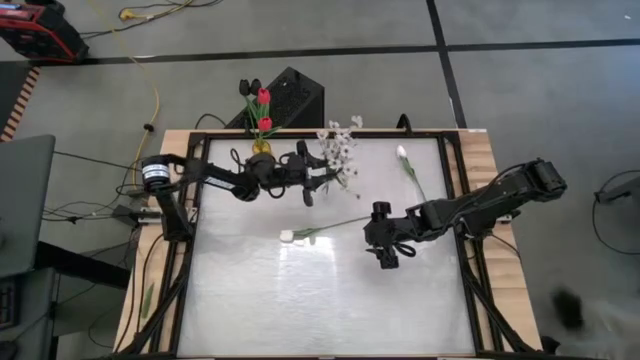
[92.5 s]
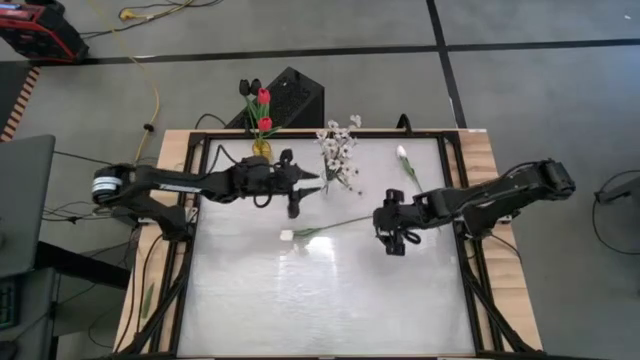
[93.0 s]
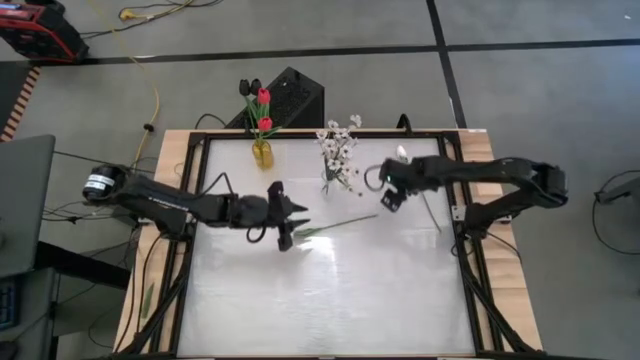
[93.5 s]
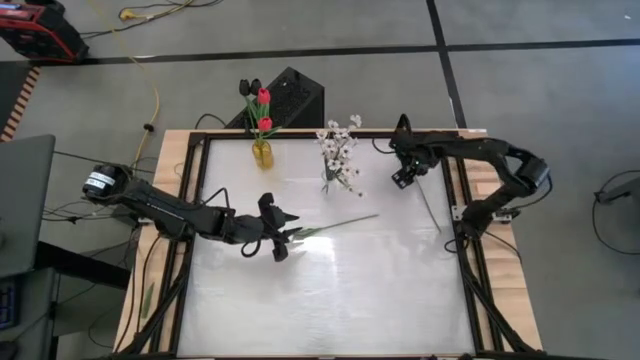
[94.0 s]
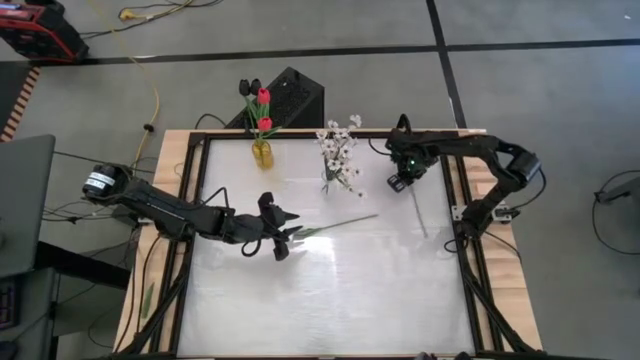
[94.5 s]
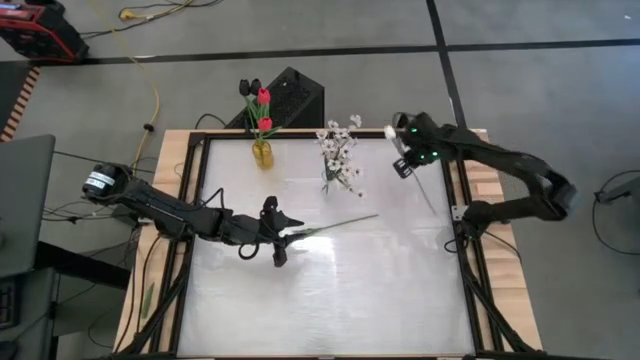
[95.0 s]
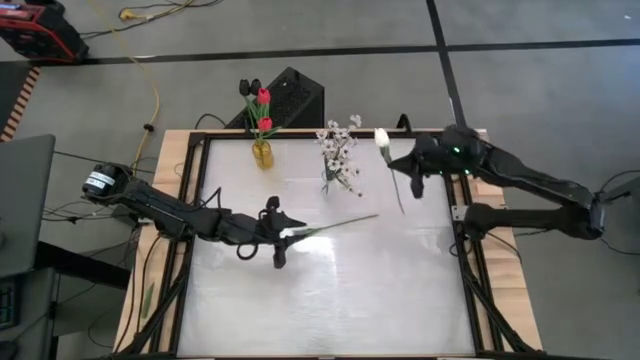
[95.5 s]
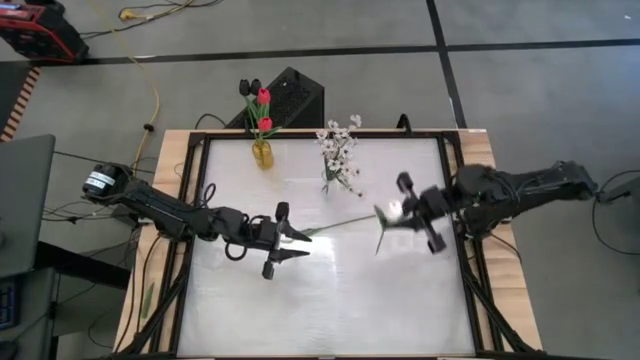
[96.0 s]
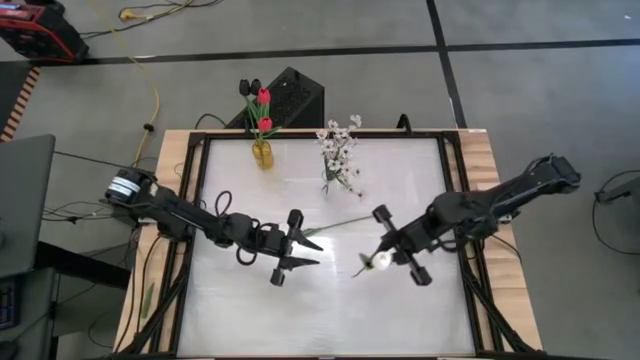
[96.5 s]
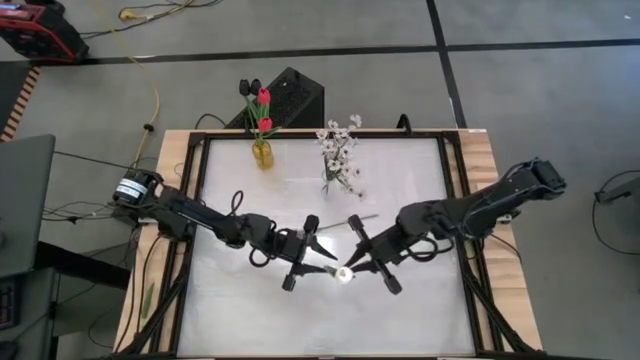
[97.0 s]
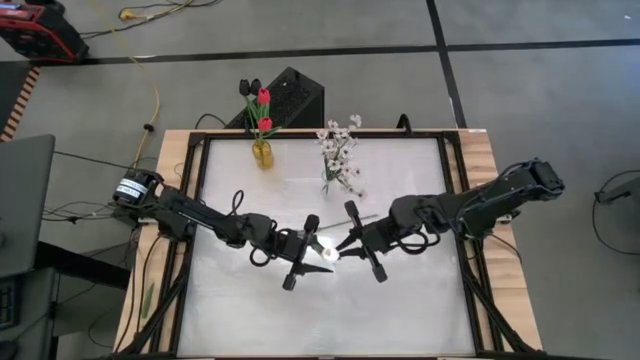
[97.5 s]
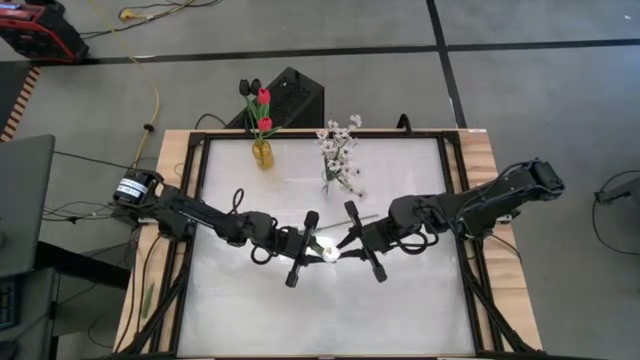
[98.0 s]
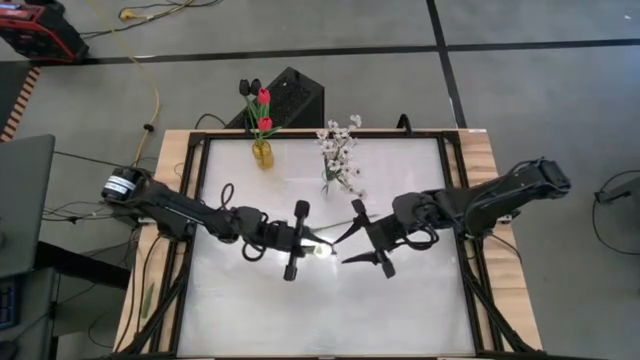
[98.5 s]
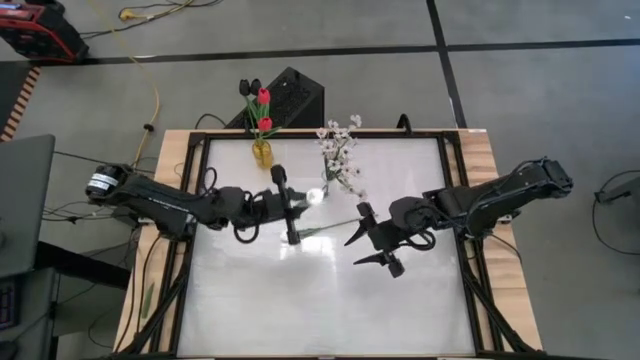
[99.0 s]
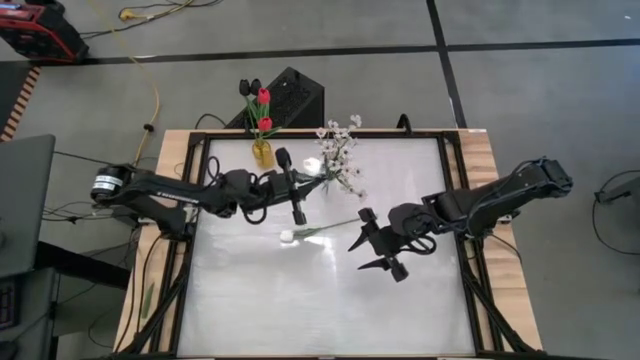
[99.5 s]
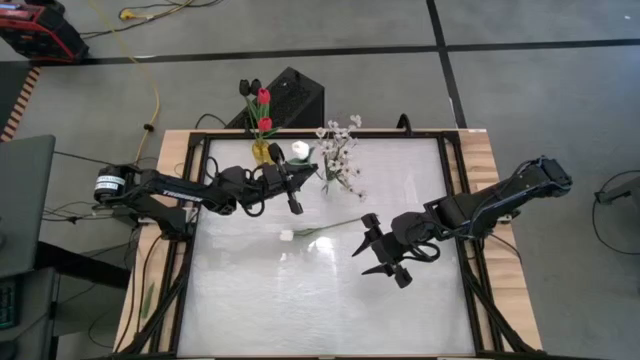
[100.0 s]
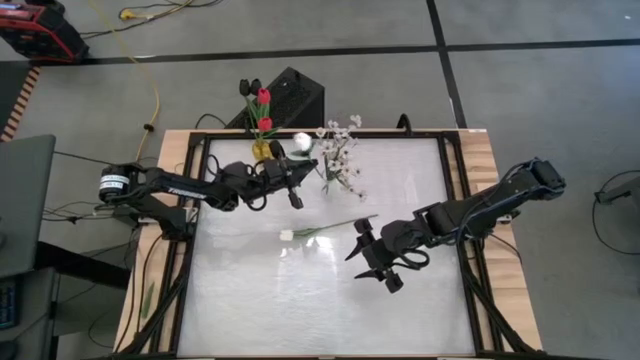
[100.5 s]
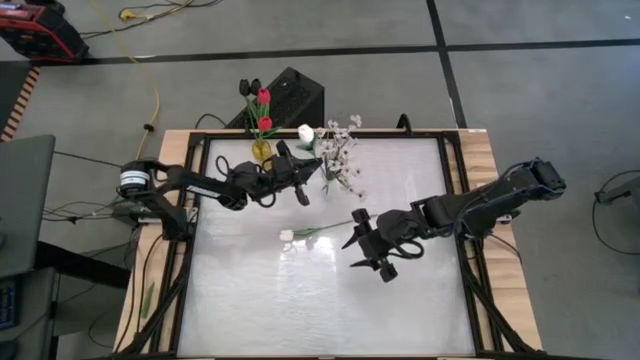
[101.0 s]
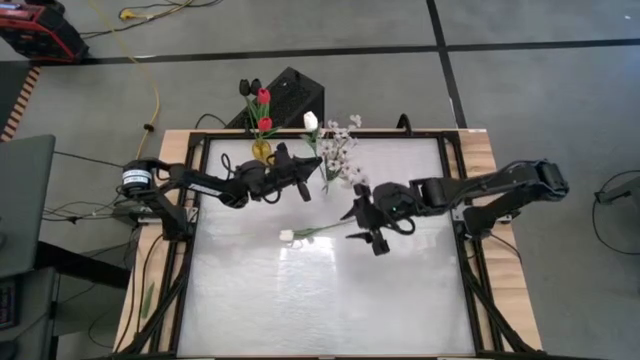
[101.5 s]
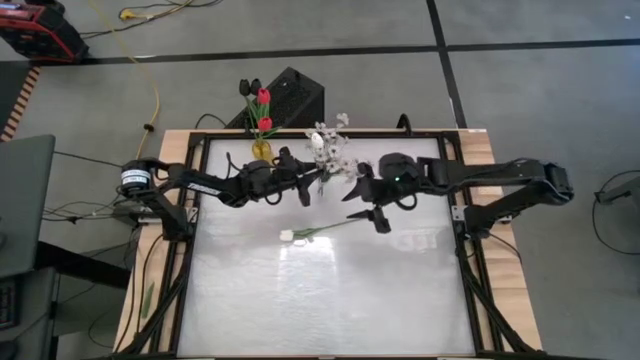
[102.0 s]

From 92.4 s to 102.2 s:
Task: Sort flowers into vase by color
Put the top white flower into the transparent flower vase

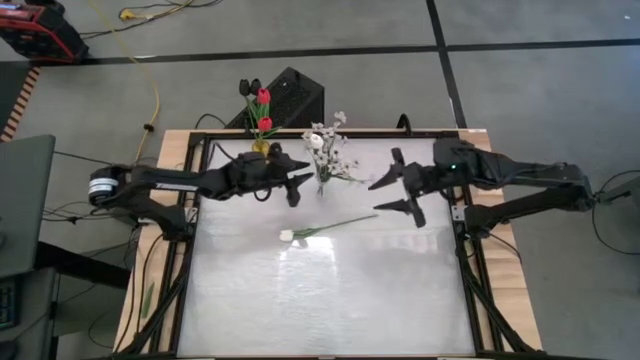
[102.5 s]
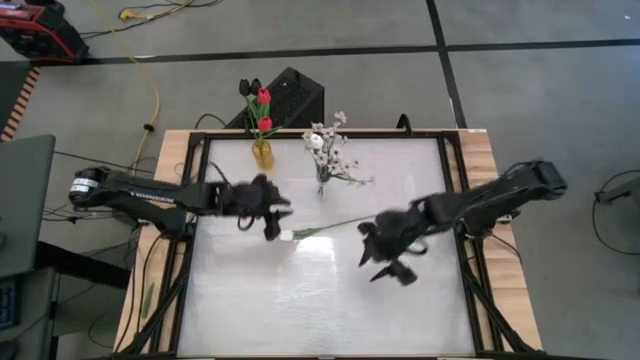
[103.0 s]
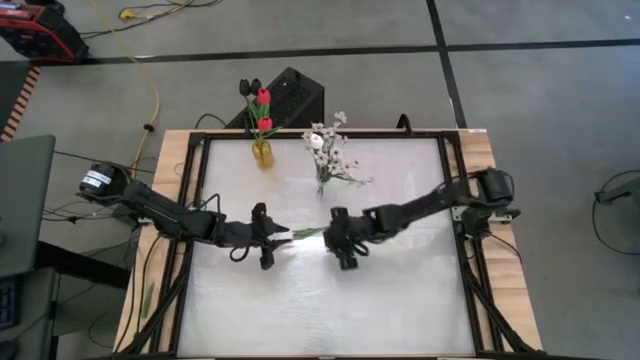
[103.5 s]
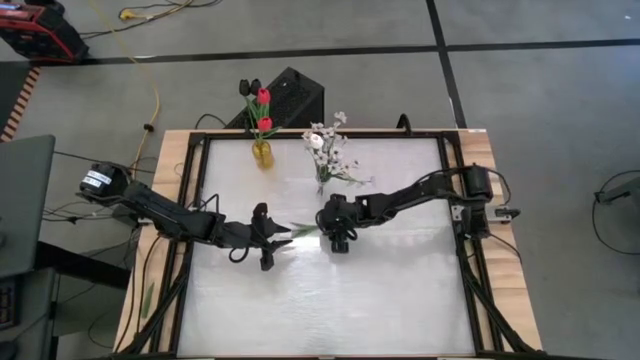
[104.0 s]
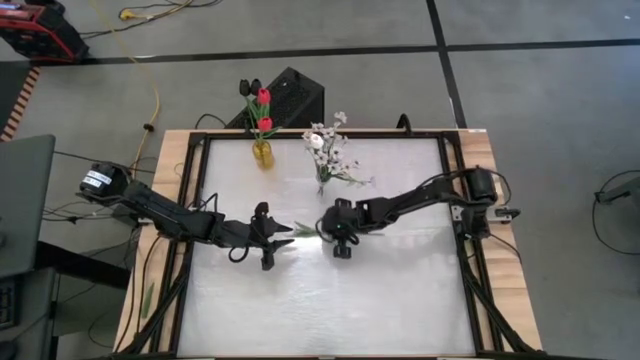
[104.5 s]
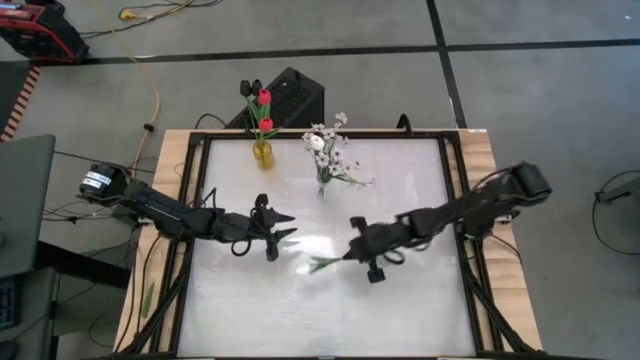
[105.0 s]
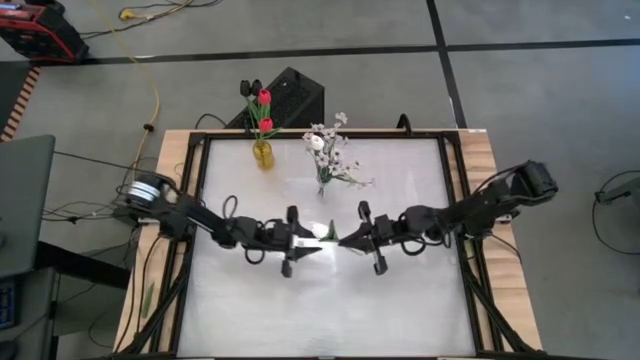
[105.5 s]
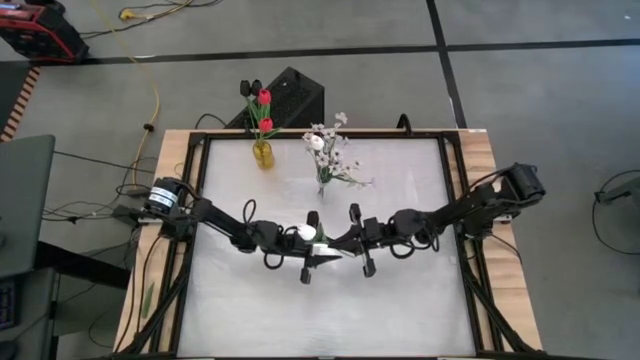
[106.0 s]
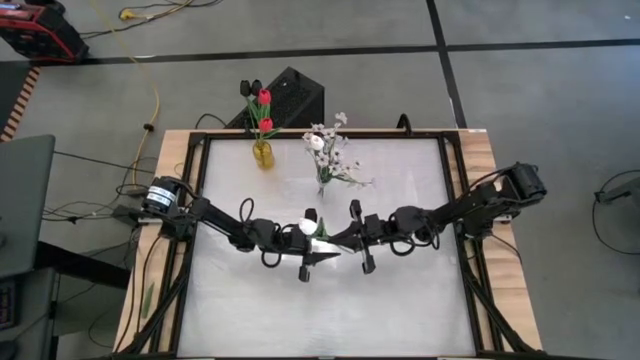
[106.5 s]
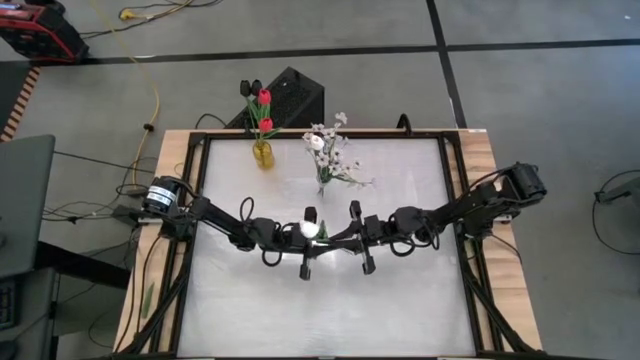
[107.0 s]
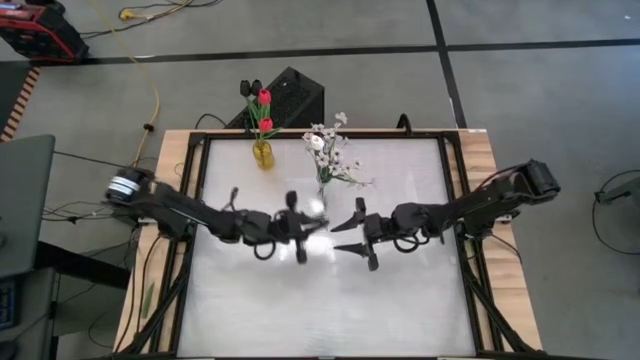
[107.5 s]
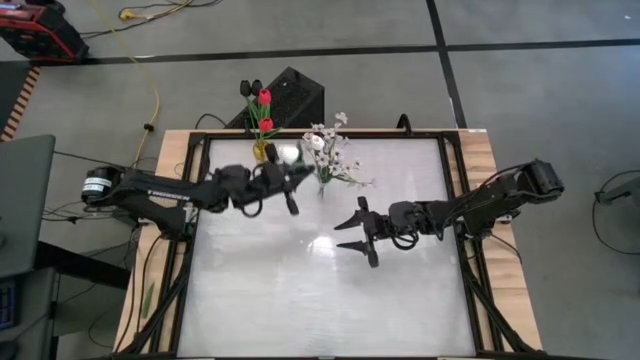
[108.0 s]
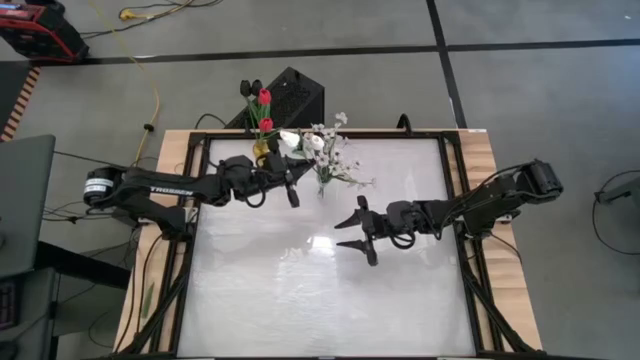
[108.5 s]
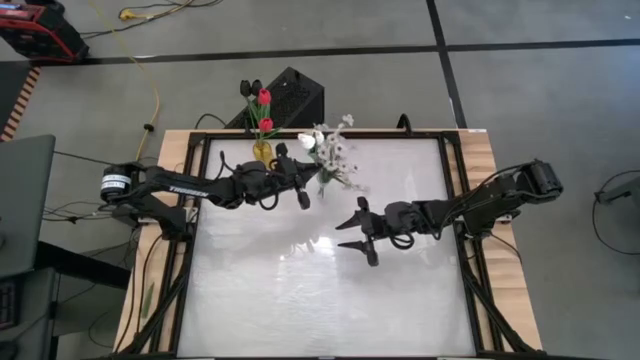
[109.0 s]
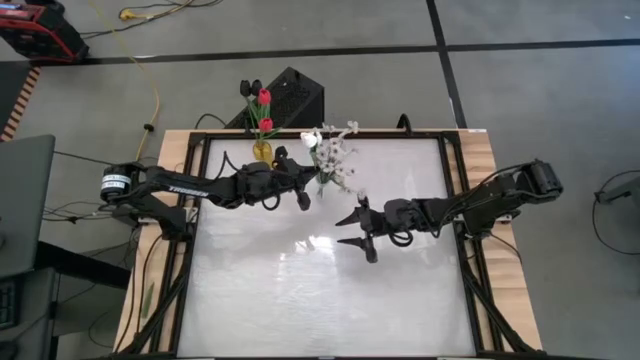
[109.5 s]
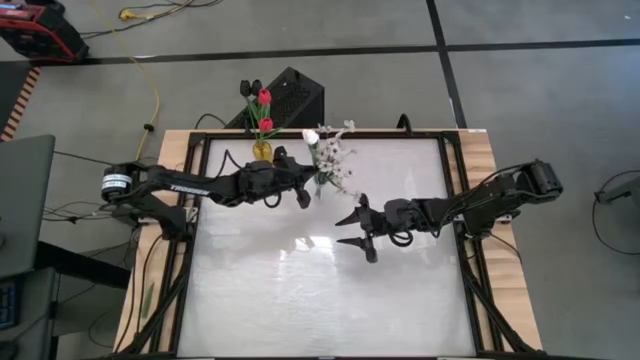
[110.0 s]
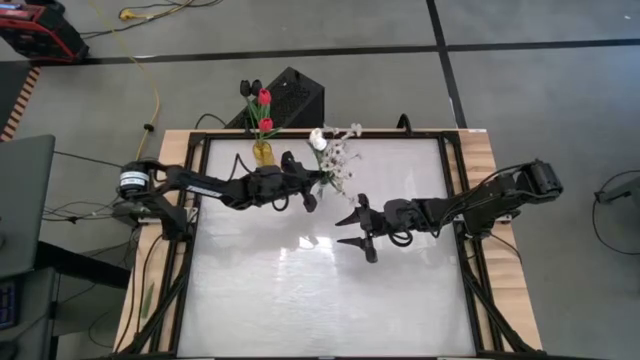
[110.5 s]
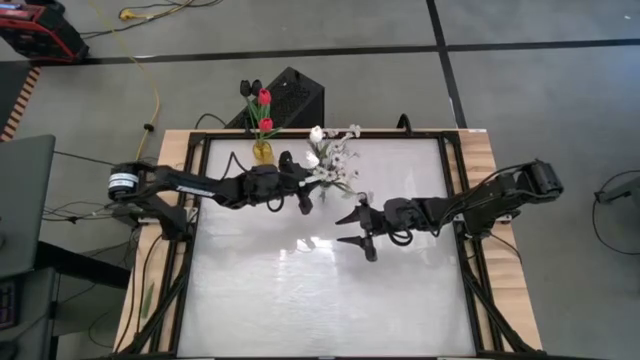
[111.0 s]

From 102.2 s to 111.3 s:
Put the white flower into the transparent flower vase

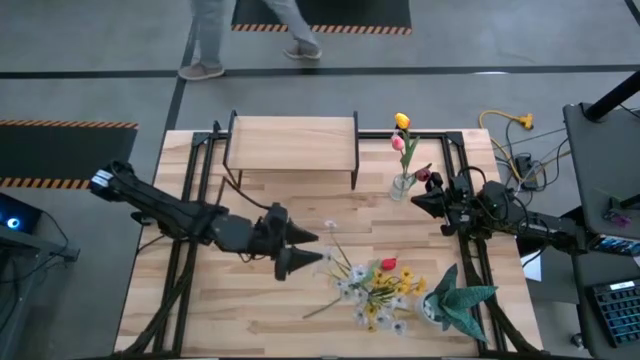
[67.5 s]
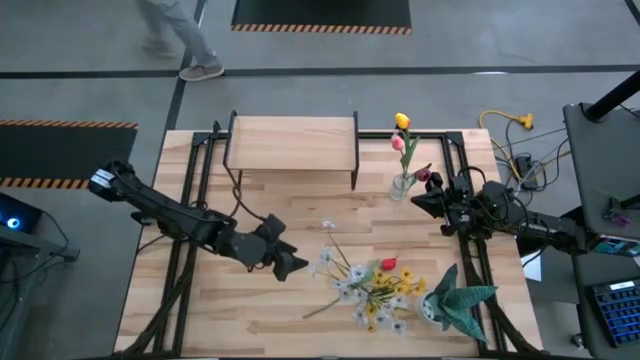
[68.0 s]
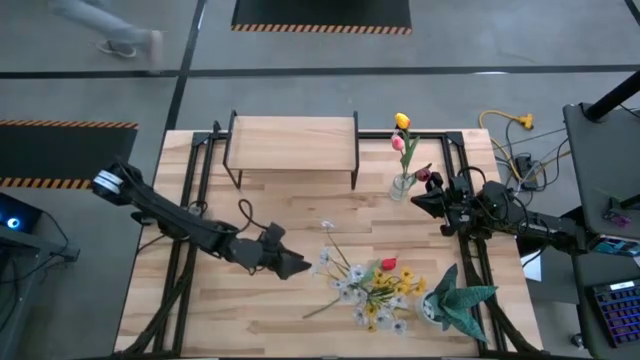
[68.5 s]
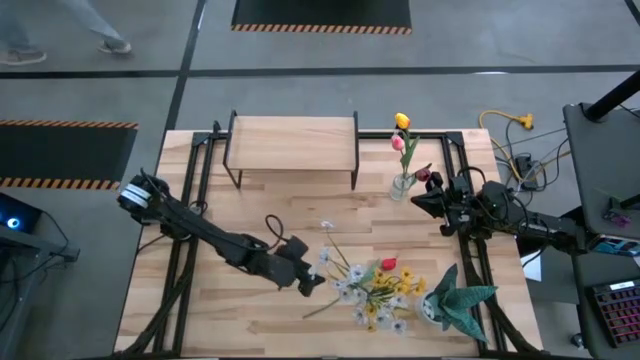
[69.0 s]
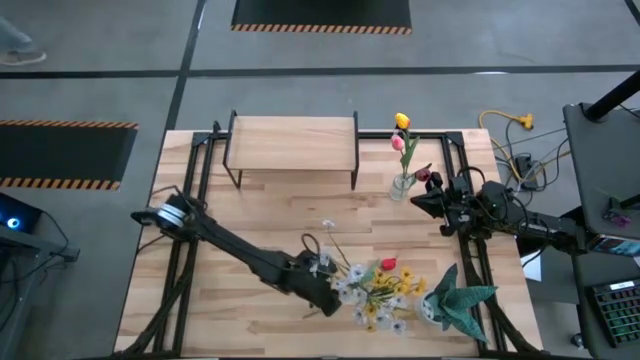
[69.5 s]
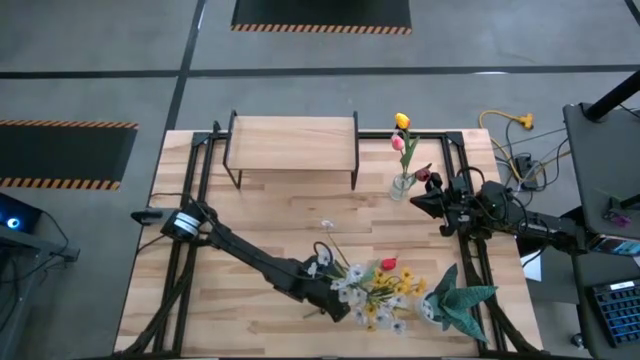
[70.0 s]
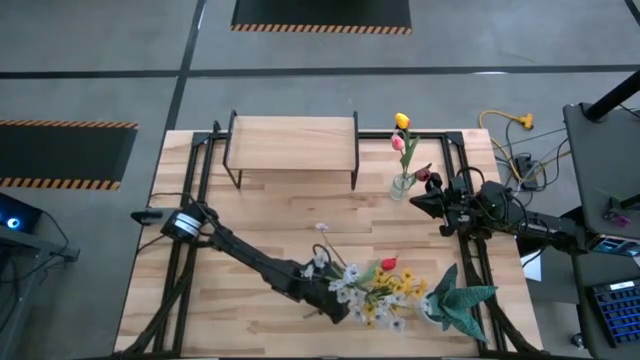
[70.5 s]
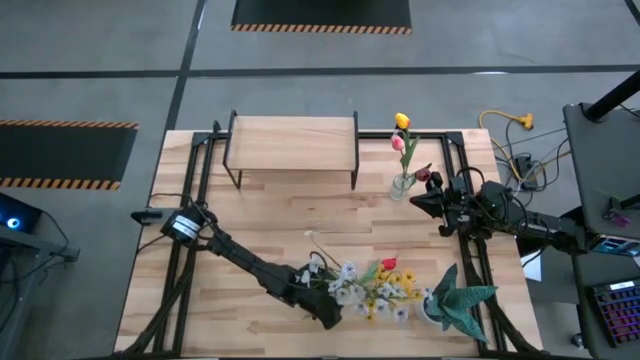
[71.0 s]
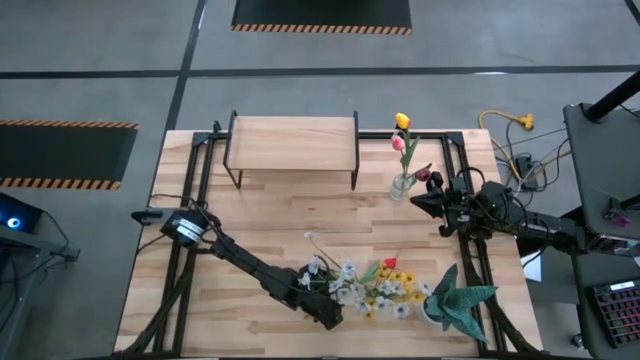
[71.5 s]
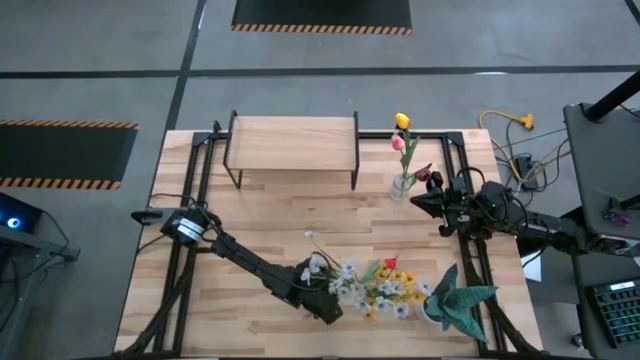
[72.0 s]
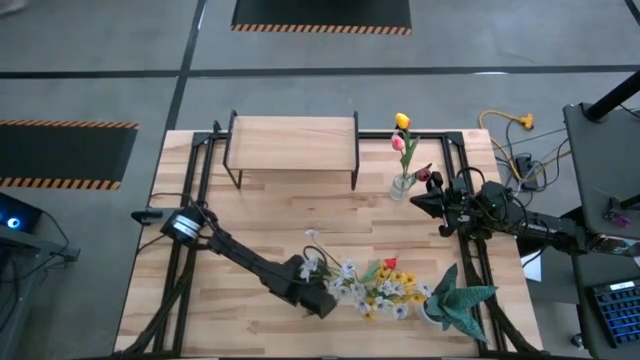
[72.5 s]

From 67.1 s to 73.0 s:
Task: Pick and place flowers into a vace then onto a shelf
Put the red tulip into the bottom transparent vase
